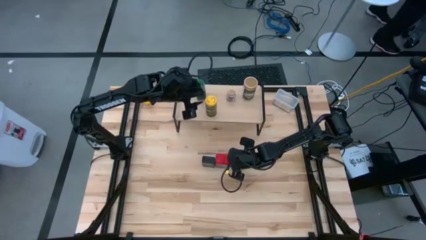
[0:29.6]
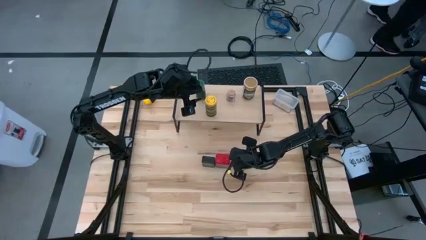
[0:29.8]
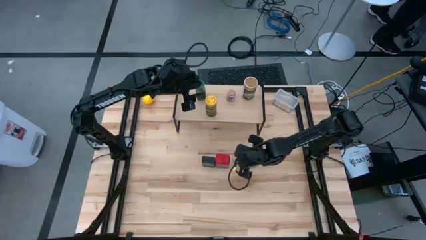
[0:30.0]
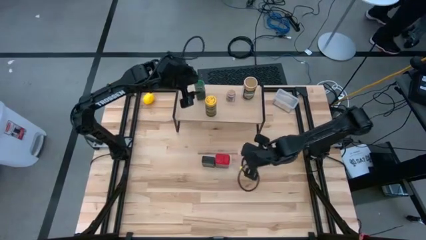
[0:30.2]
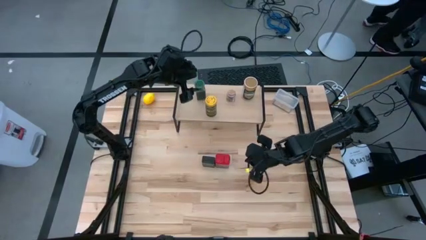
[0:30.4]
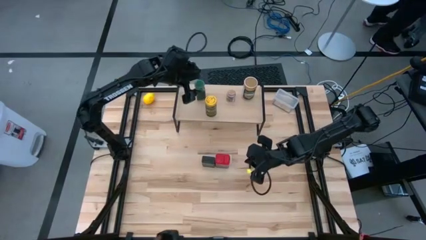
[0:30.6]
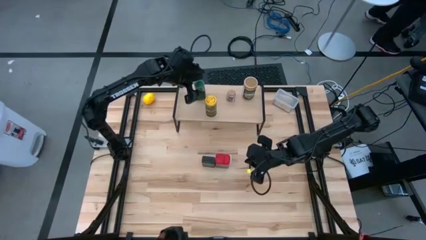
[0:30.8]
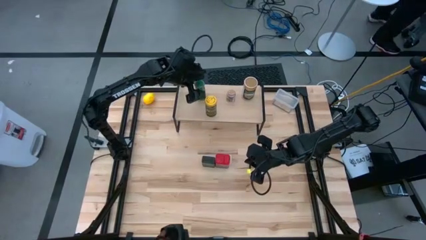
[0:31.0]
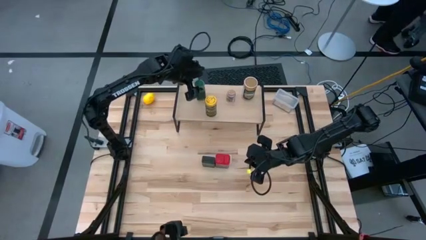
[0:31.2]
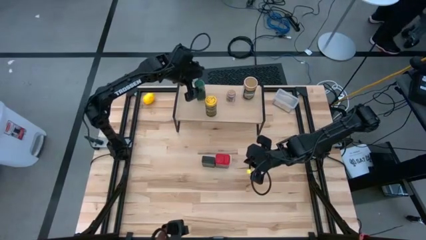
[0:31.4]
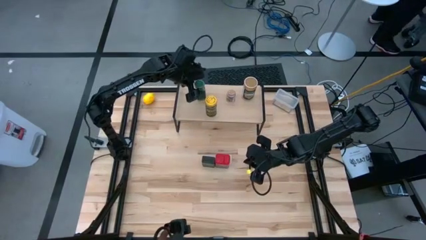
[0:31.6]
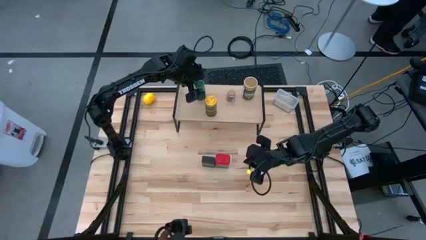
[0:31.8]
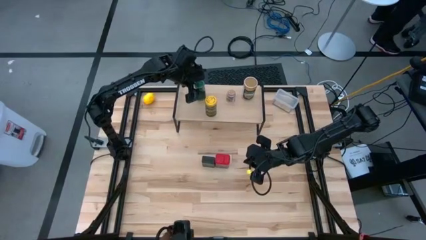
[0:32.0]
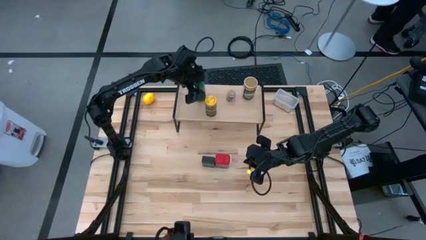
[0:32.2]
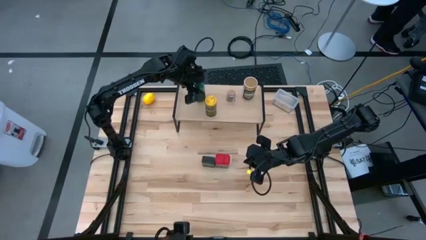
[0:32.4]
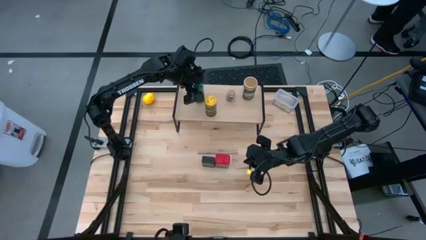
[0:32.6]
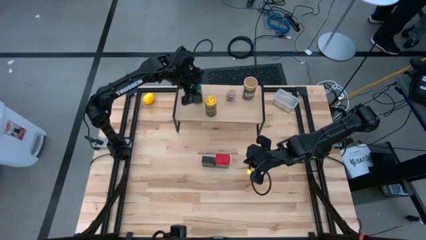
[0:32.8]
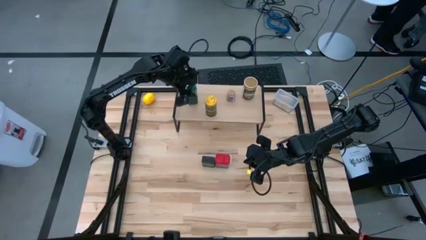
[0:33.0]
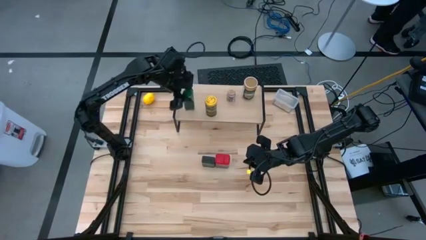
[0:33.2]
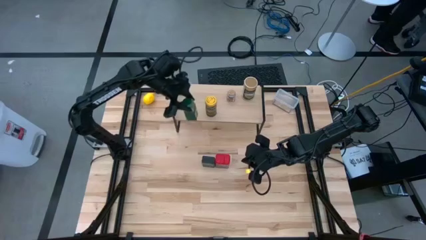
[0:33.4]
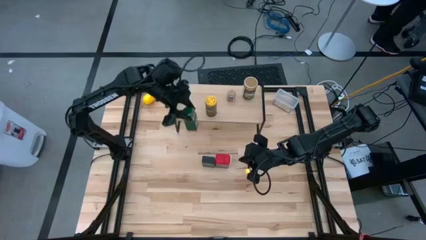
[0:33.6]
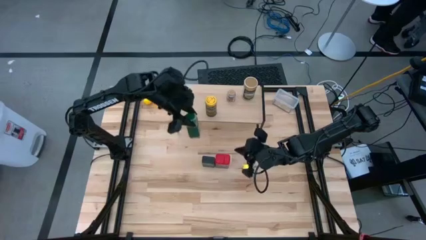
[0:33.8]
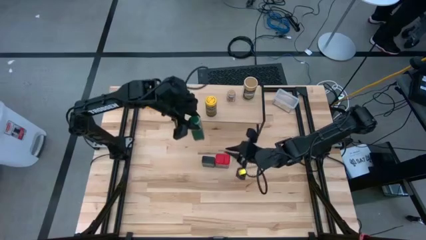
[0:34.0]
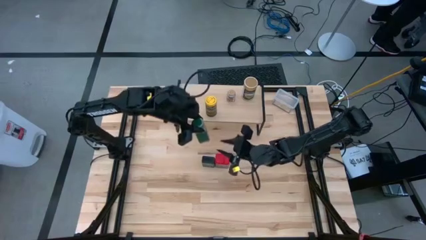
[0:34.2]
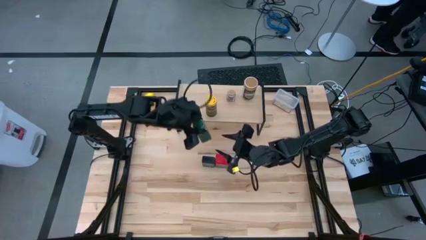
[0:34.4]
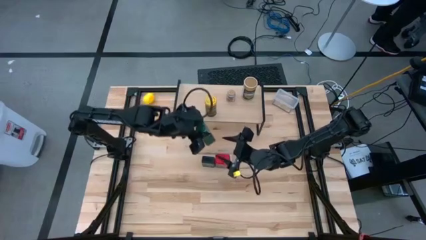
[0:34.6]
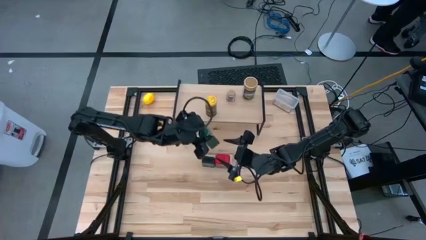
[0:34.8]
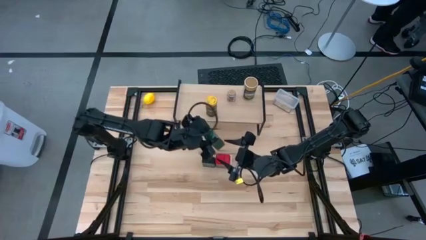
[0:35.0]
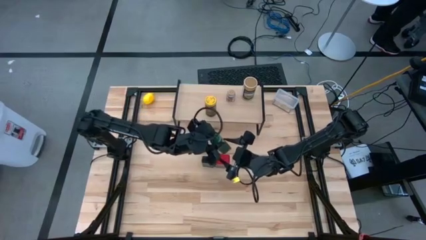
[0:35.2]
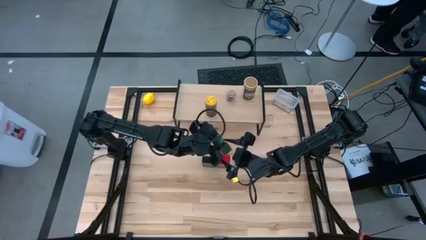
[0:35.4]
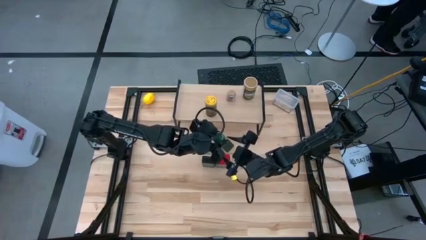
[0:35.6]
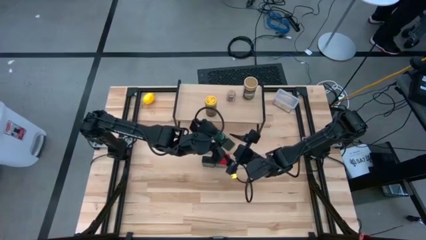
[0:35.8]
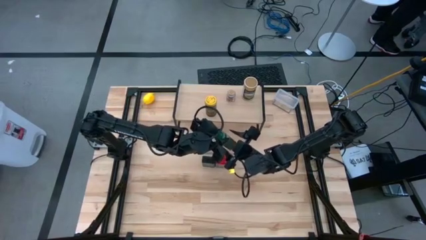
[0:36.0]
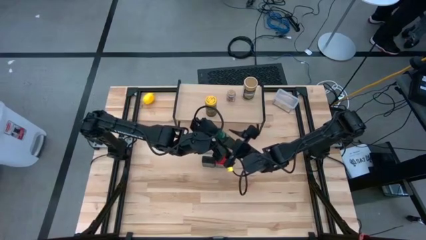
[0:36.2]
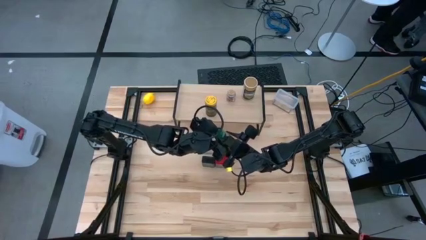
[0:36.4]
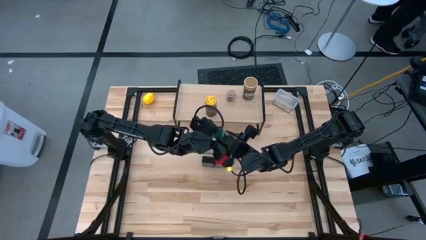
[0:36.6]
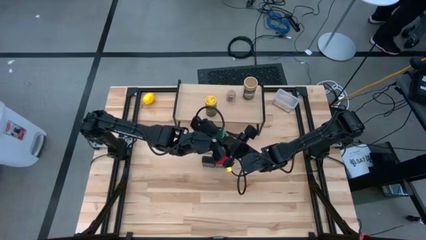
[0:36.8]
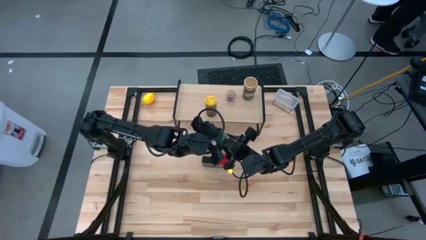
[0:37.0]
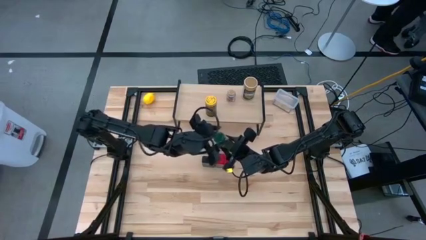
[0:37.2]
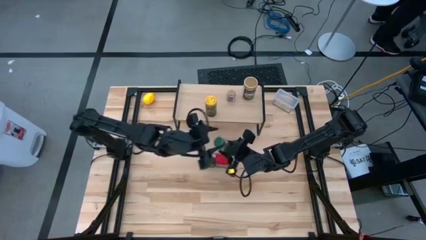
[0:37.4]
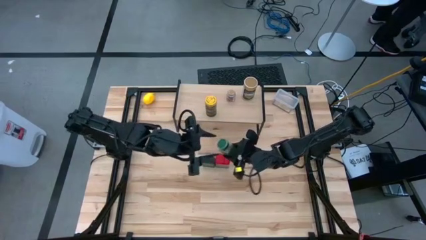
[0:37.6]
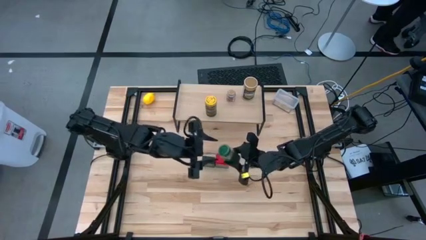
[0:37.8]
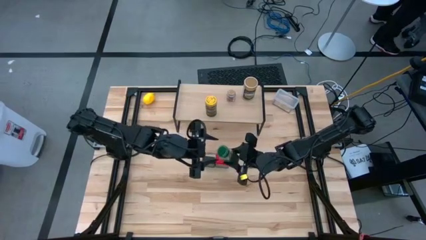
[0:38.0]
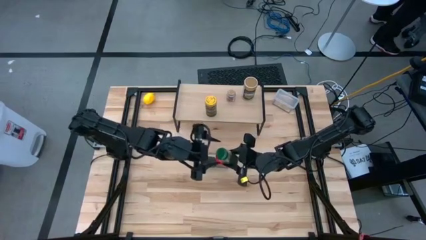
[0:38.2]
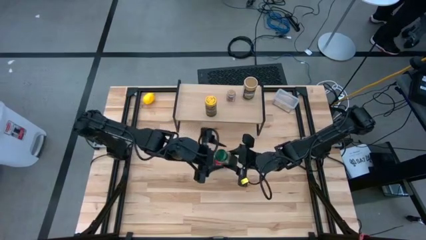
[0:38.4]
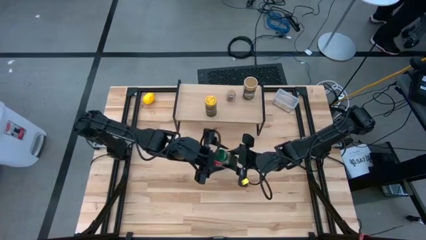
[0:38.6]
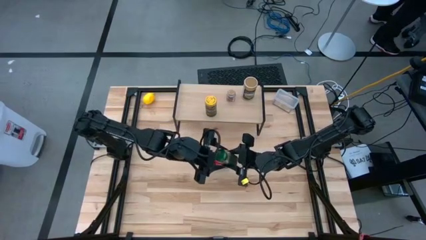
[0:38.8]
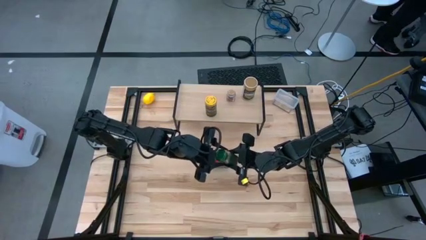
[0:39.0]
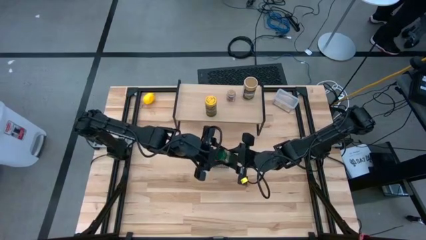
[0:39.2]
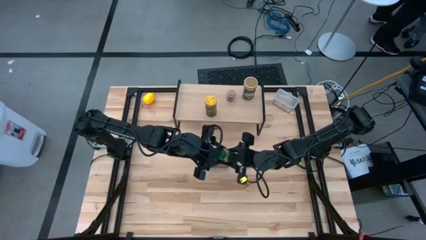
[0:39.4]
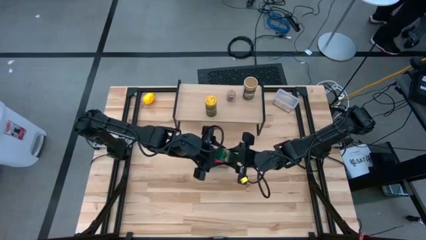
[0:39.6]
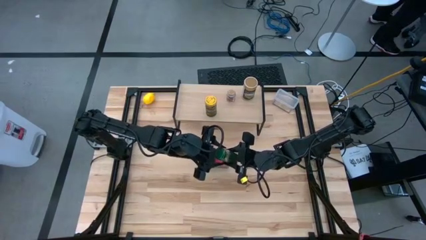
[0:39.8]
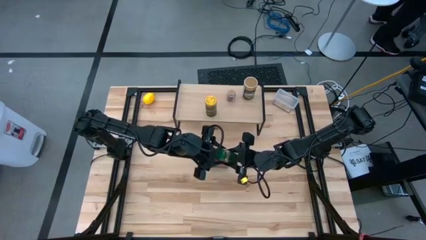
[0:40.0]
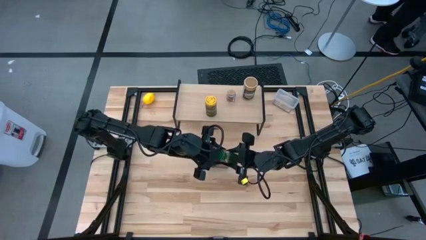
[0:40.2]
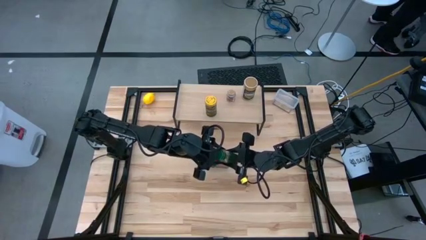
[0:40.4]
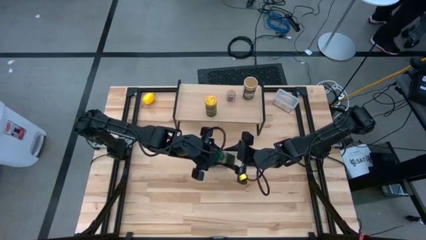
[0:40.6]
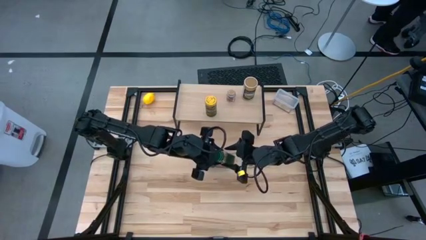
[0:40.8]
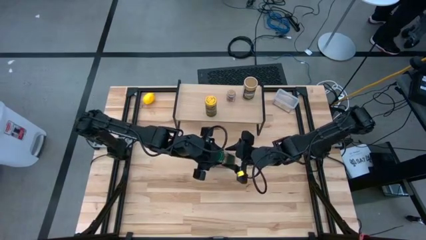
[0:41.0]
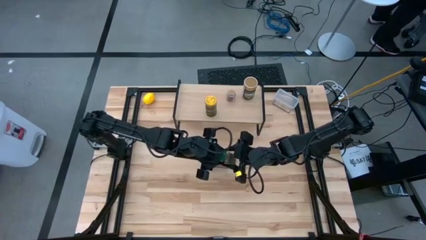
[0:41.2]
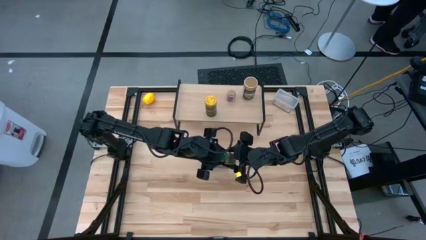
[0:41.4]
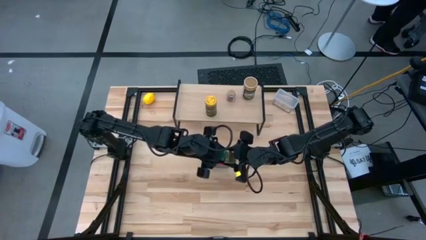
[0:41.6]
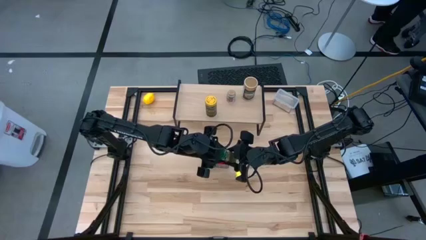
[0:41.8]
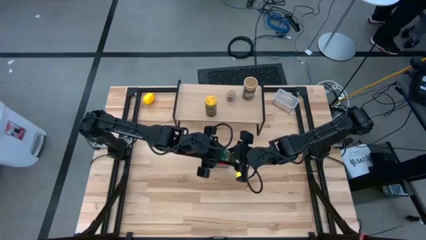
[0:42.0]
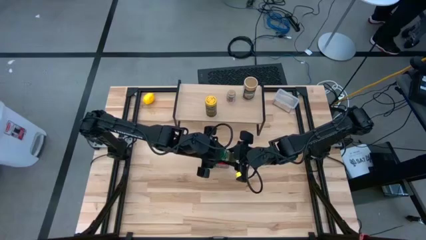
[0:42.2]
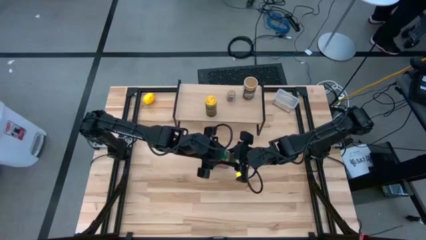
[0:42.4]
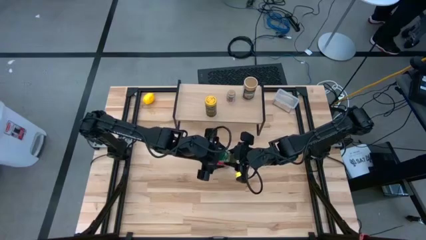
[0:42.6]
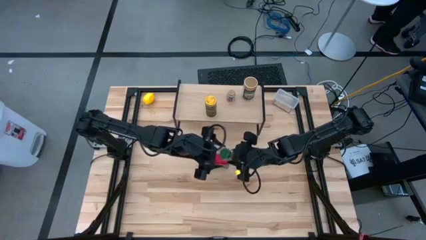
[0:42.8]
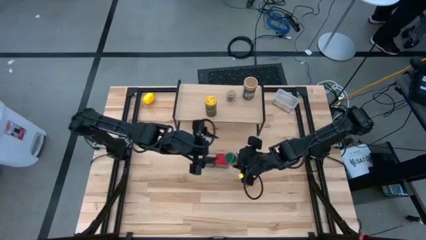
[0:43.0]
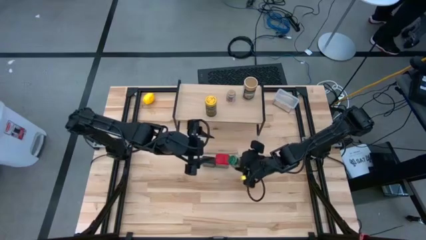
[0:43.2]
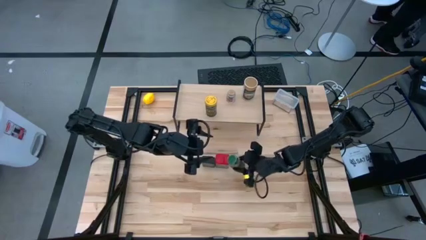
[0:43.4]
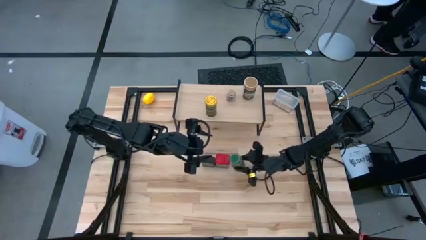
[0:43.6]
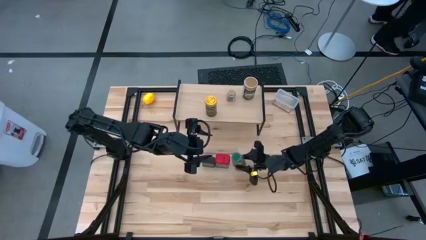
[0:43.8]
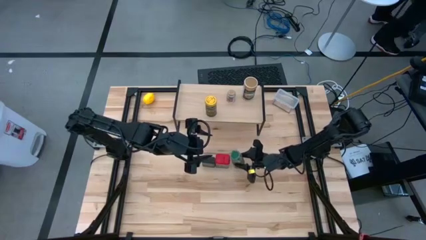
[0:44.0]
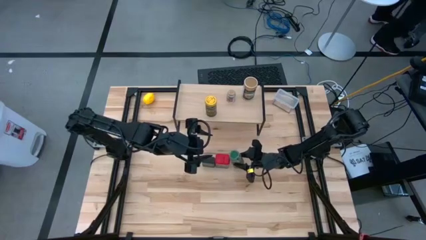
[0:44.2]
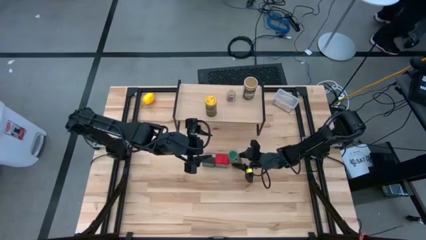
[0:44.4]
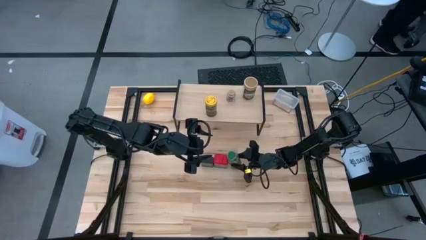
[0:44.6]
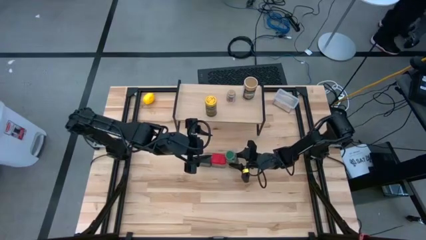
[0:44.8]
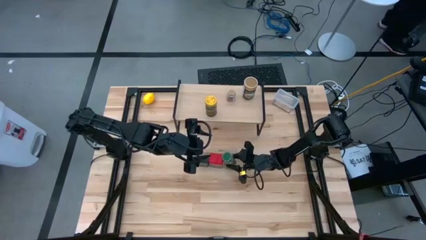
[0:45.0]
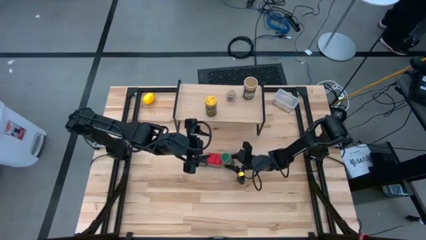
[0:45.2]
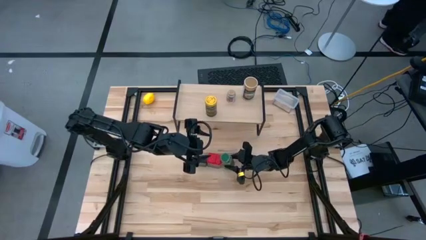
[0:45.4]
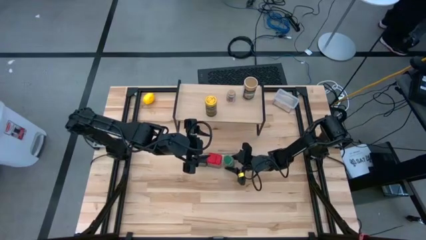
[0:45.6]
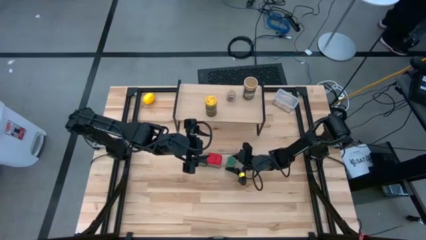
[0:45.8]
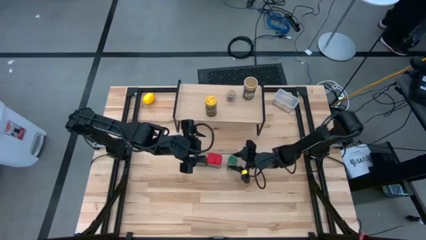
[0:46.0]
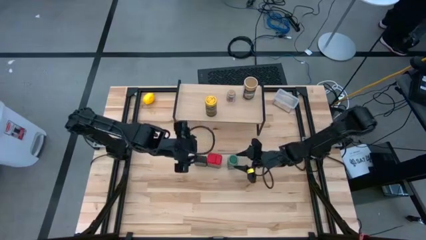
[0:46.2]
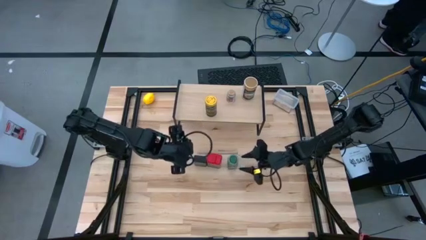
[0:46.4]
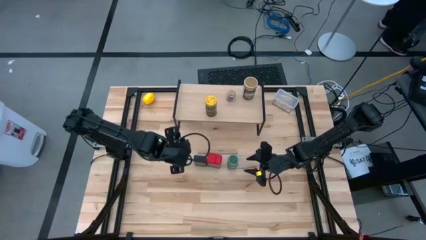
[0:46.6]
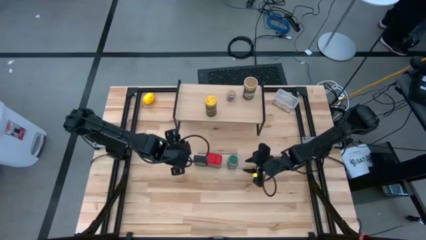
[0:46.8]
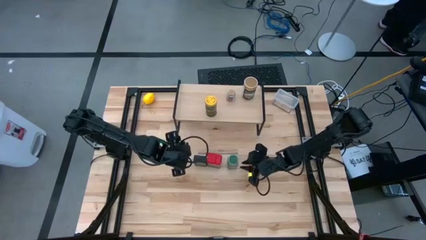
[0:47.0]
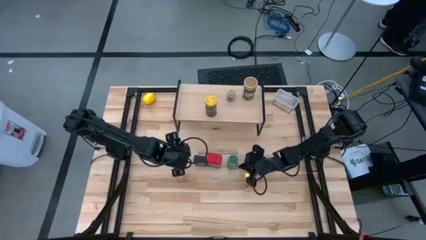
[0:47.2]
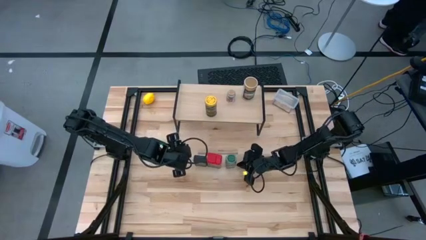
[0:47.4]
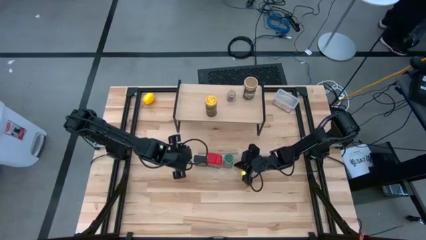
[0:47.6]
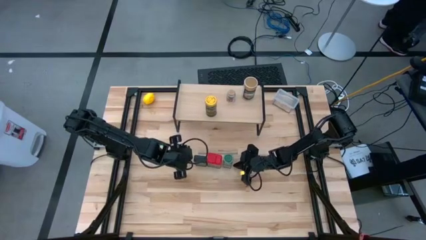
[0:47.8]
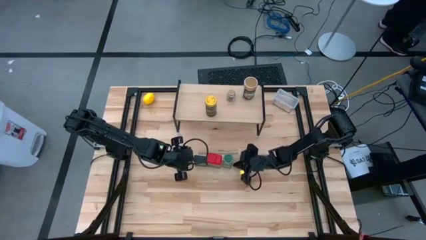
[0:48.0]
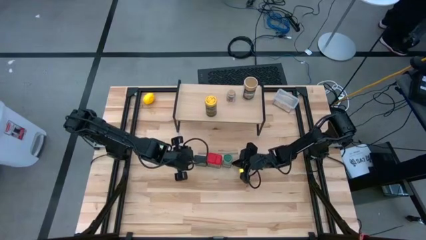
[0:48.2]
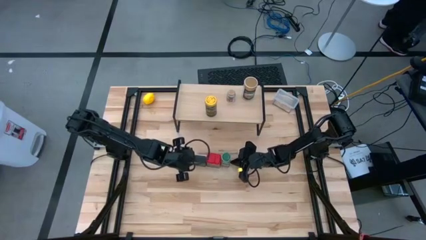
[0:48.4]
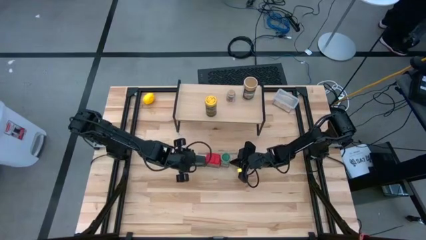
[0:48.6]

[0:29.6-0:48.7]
Task: Shelf spices
Remove the green seasoning bottle from the shelf
